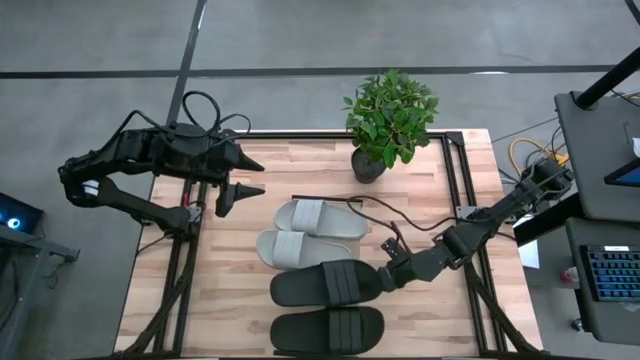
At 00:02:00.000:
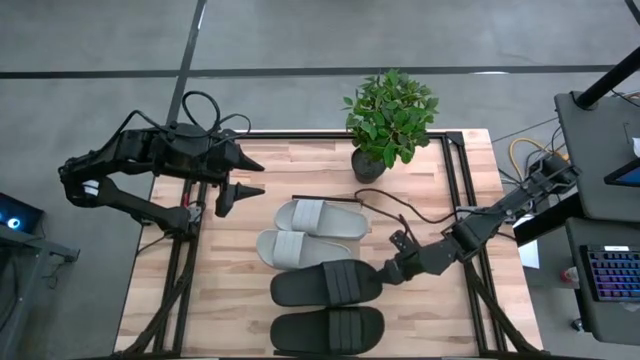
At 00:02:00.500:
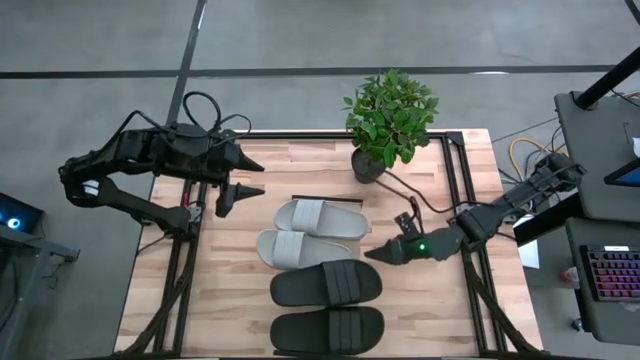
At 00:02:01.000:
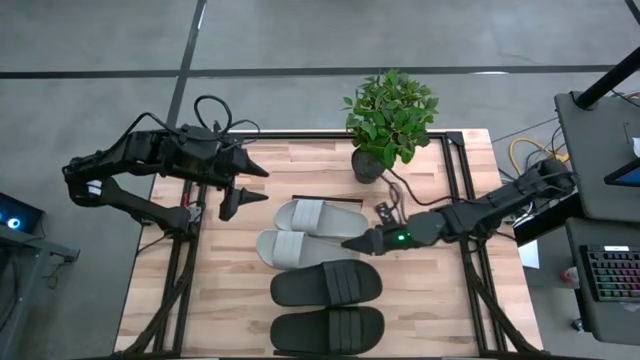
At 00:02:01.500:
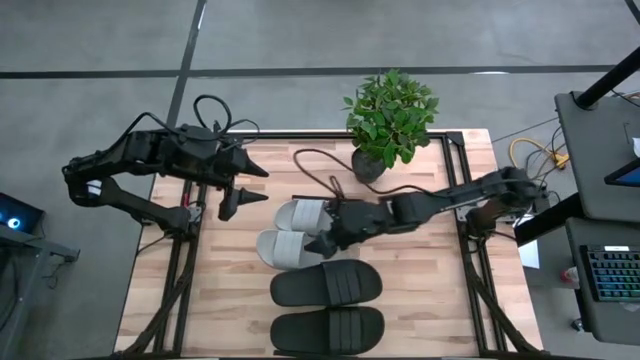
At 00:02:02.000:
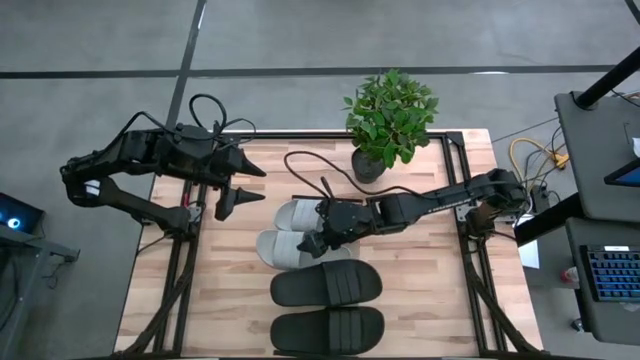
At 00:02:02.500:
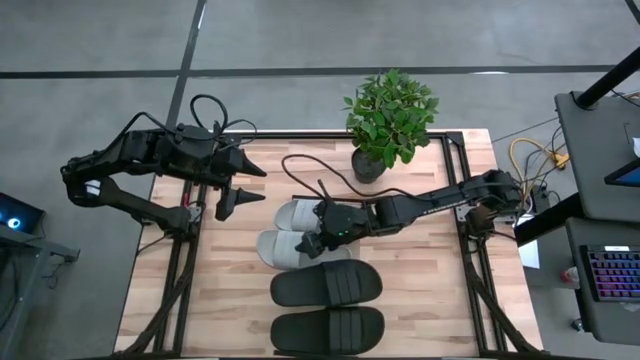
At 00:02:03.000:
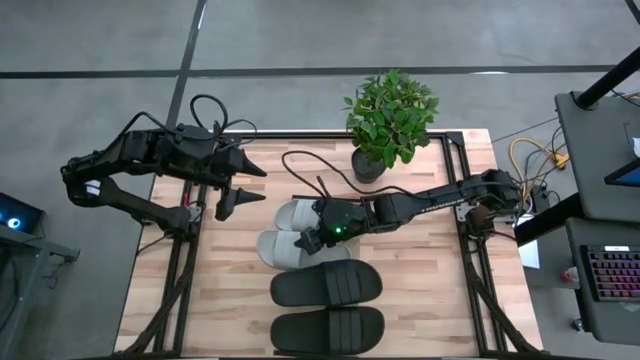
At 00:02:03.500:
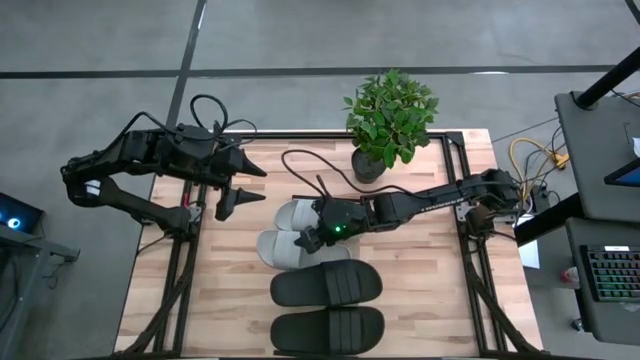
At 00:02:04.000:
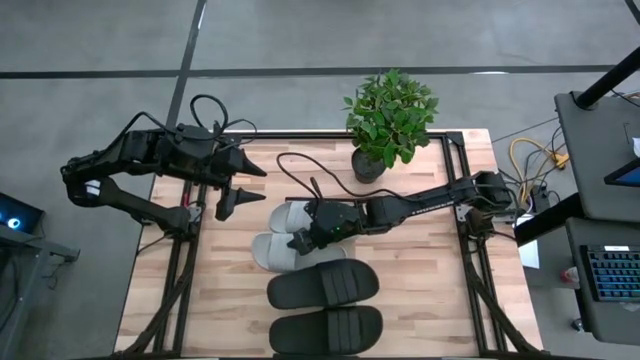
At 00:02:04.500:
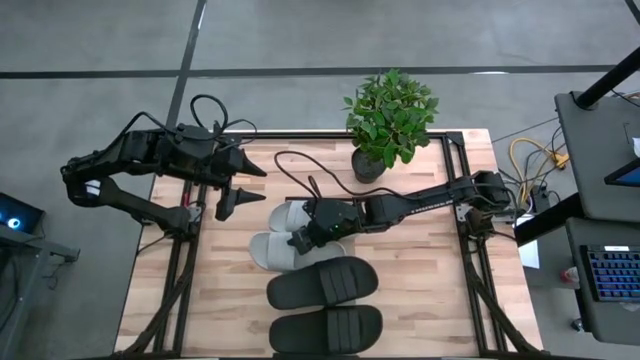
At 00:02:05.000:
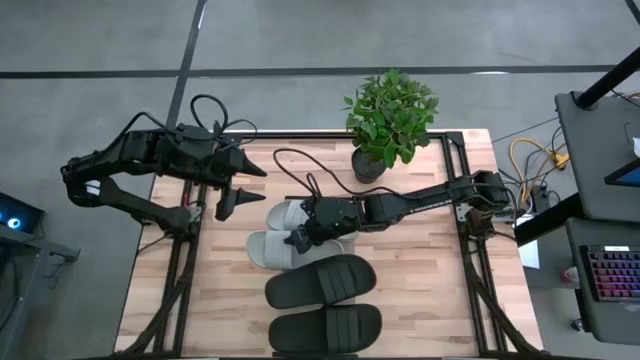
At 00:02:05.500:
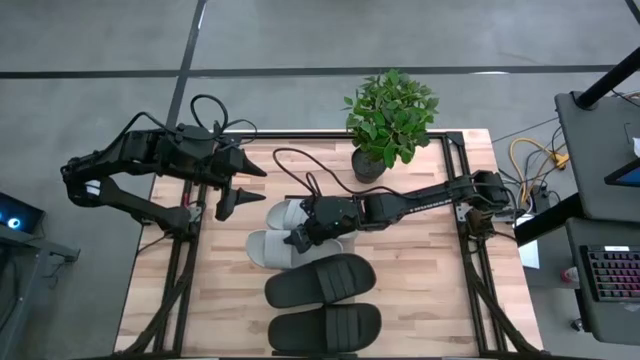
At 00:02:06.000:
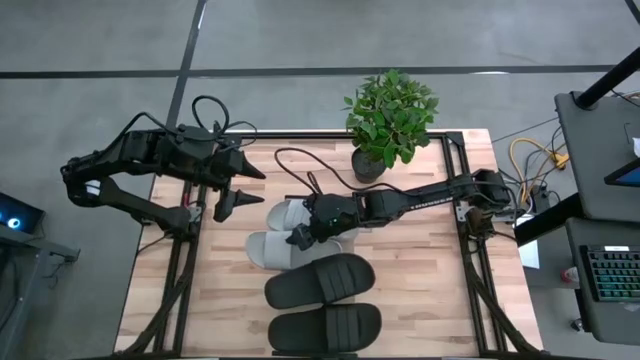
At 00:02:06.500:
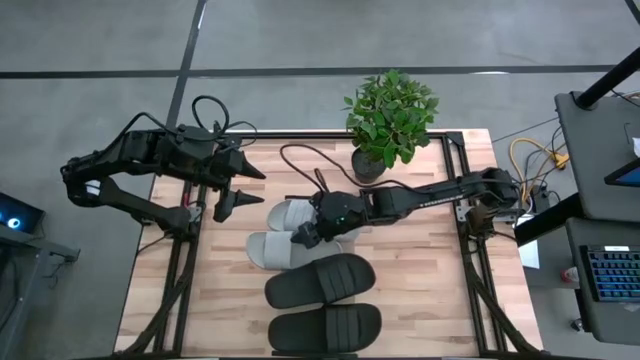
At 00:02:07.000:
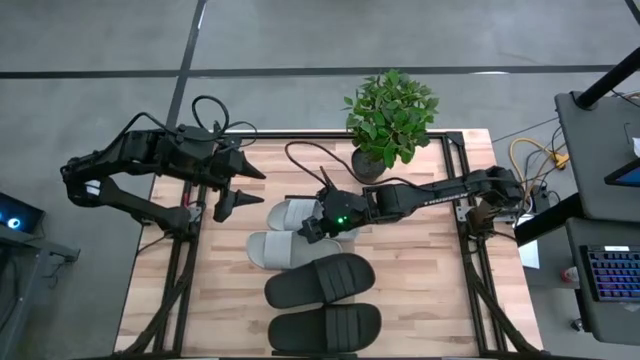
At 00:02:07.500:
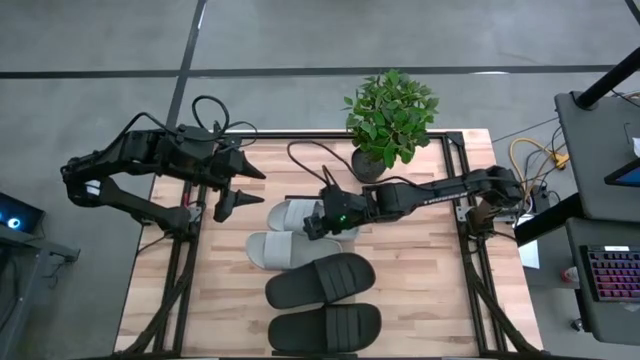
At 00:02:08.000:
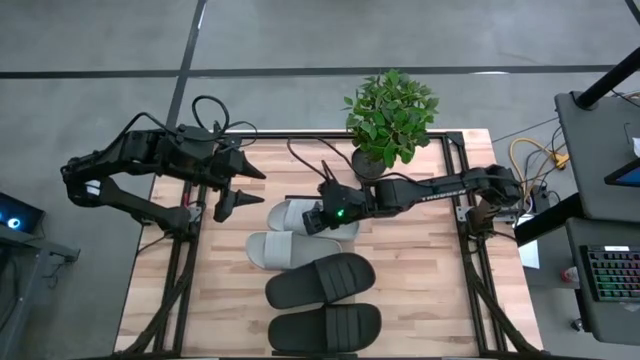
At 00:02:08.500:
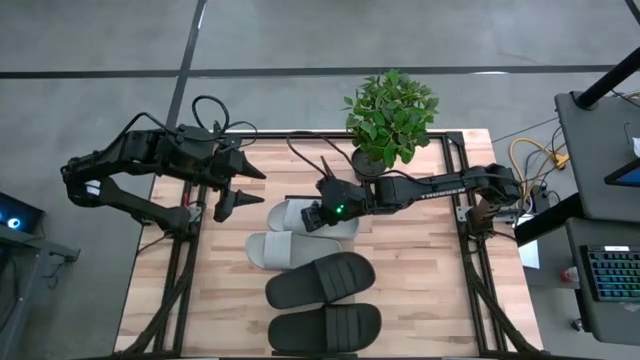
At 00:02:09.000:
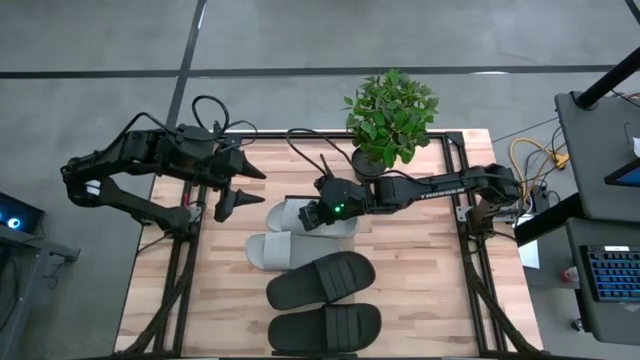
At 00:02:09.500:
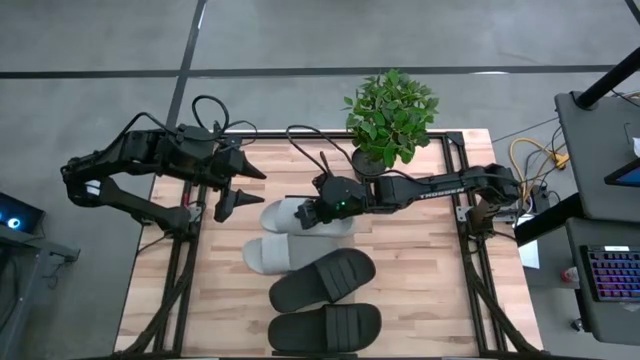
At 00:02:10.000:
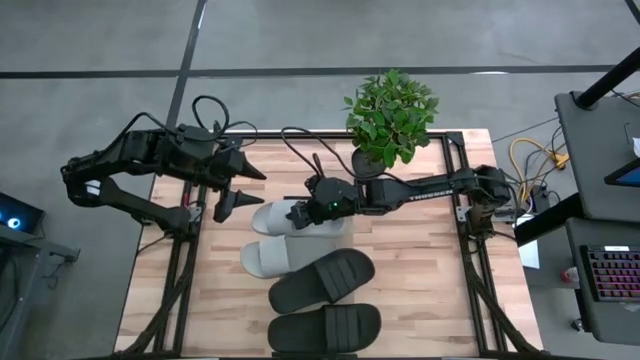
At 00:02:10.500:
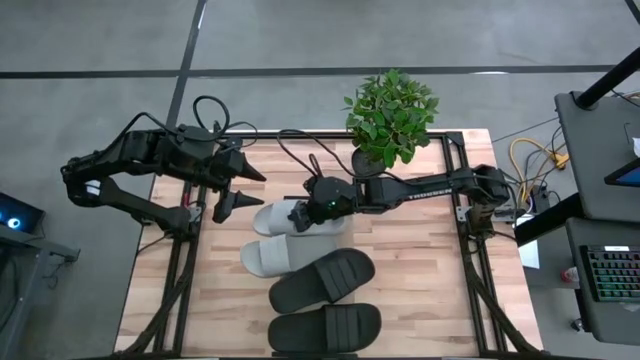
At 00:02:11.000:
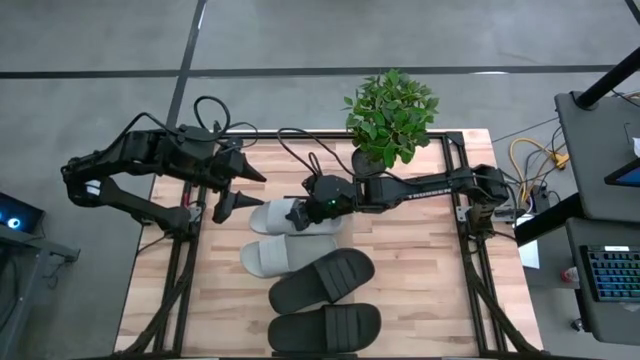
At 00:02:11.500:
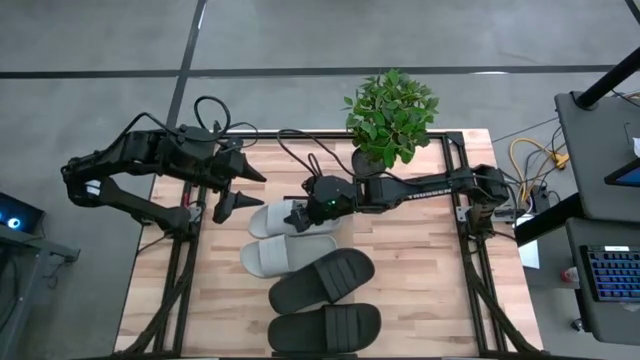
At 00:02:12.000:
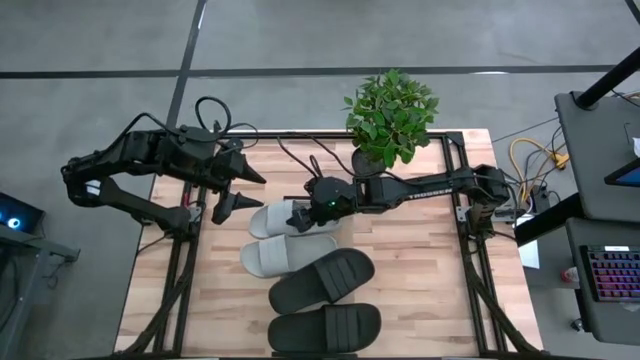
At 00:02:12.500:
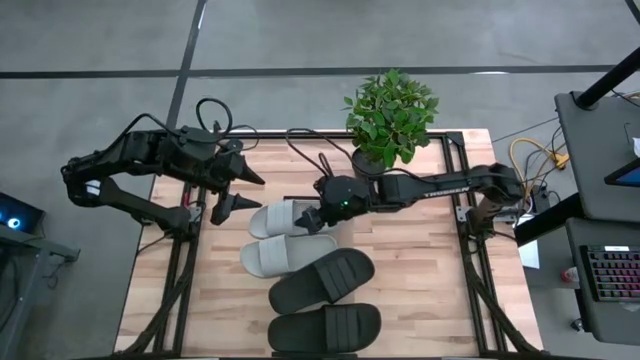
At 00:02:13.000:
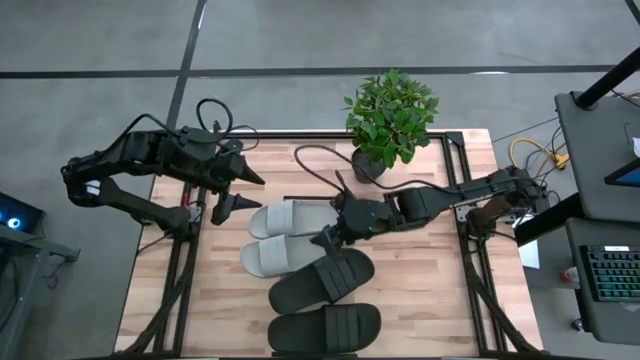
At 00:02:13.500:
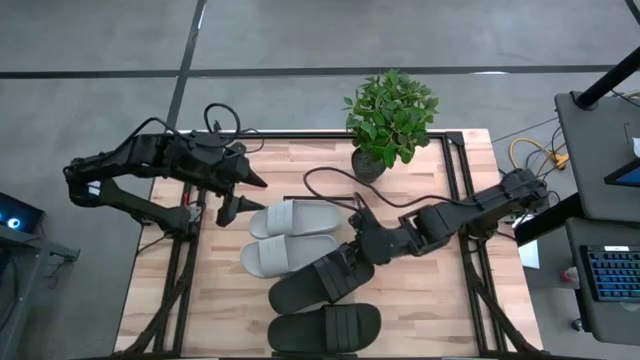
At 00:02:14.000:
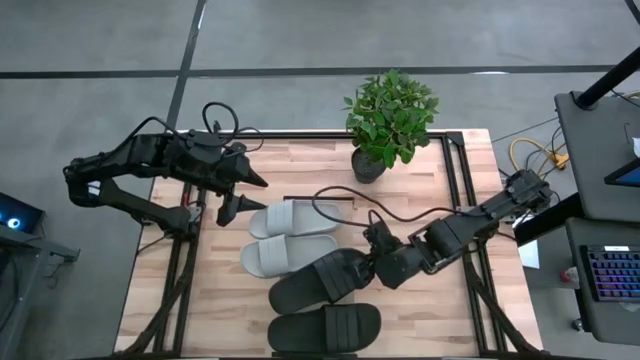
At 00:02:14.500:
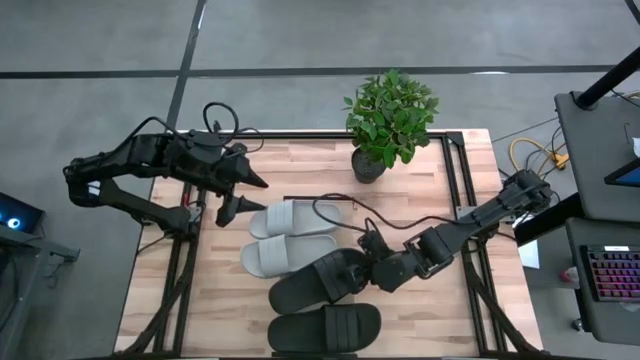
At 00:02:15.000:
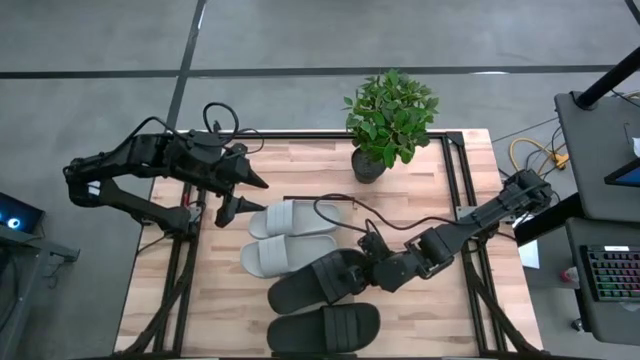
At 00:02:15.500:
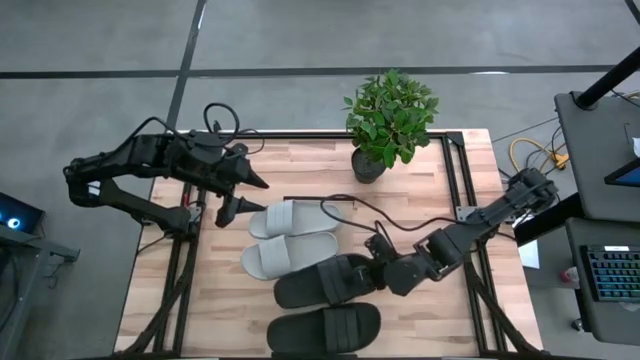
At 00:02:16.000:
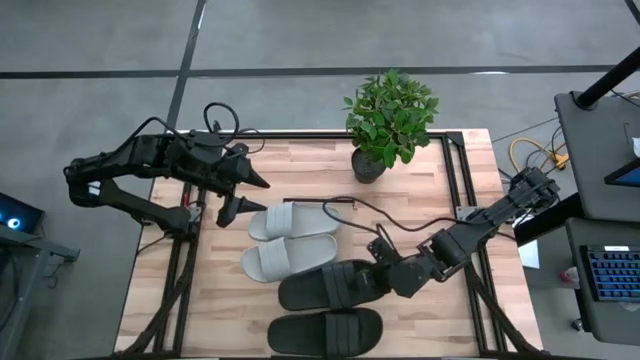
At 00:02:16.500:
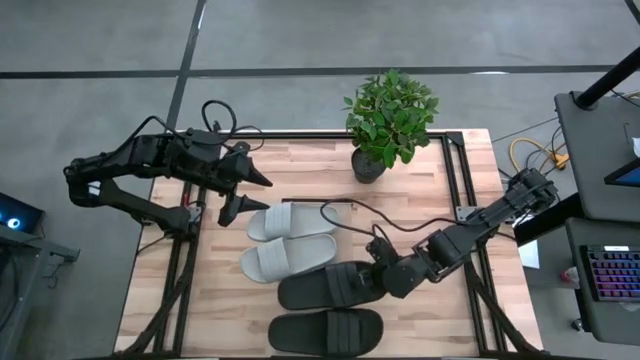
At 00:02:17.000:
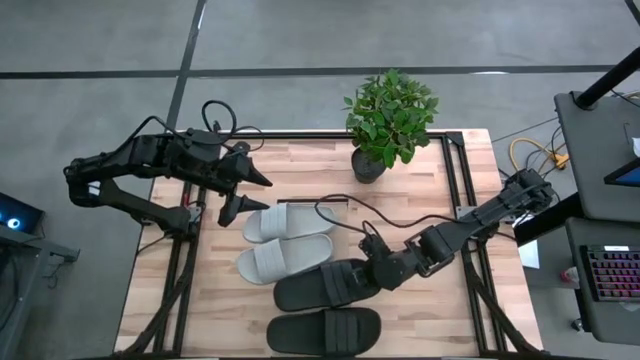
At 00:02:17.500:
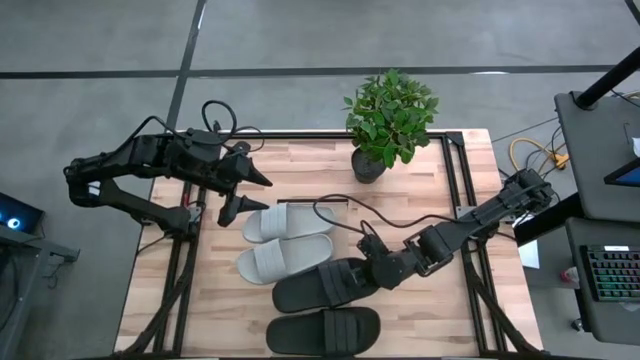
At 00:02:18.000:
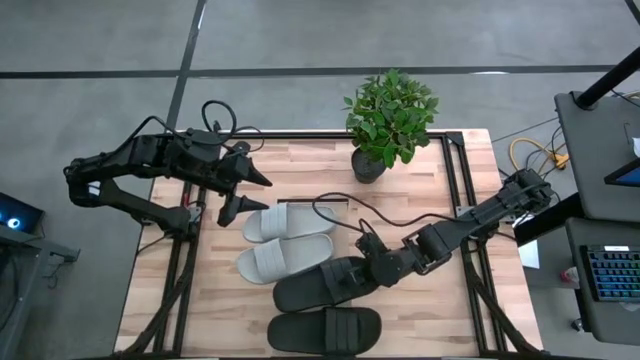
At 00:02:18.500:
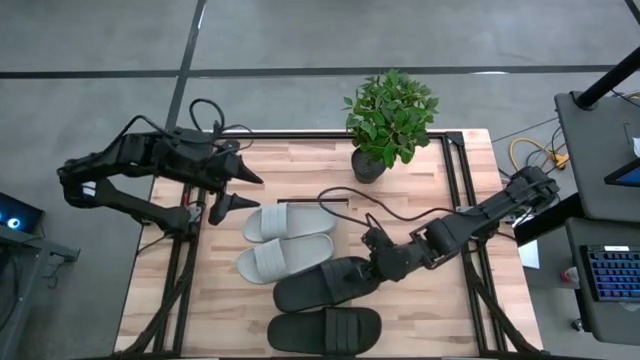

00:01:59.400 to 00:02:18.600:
Task: Pick and place slides into the shelf
Adjust the slippers on the shelf
